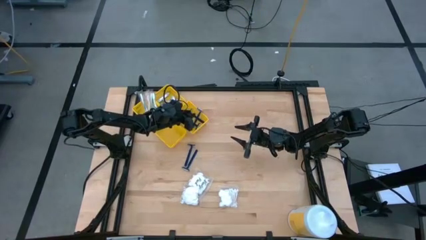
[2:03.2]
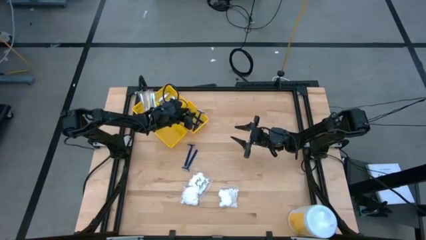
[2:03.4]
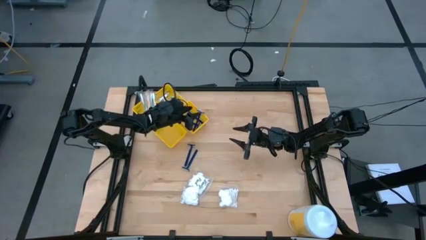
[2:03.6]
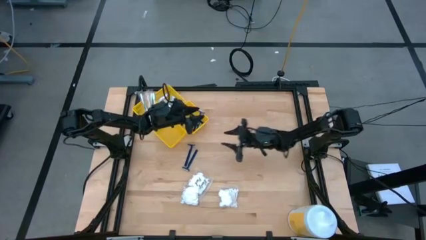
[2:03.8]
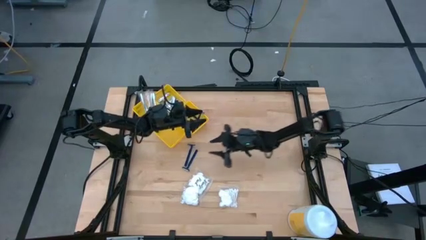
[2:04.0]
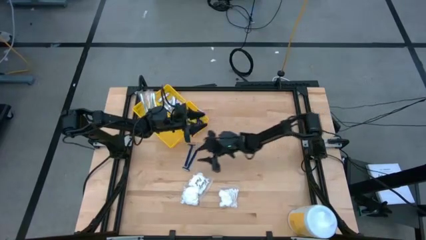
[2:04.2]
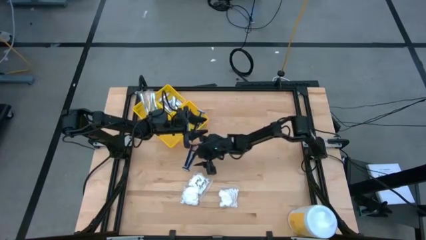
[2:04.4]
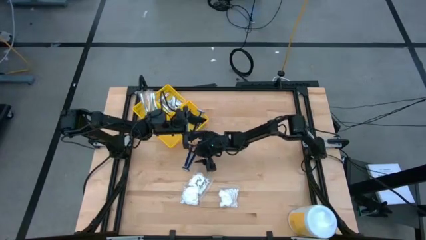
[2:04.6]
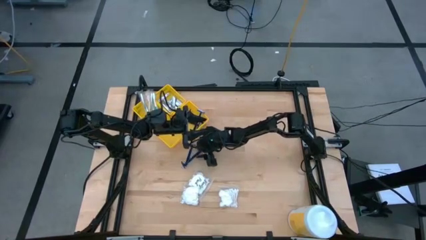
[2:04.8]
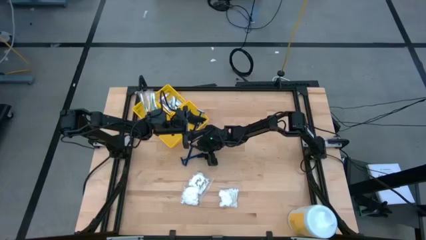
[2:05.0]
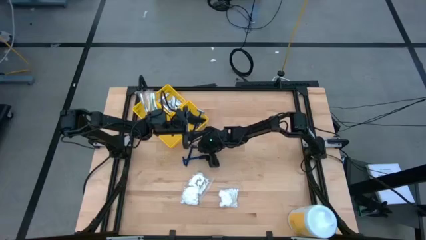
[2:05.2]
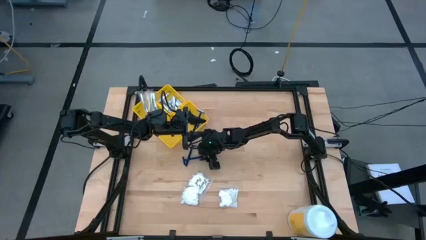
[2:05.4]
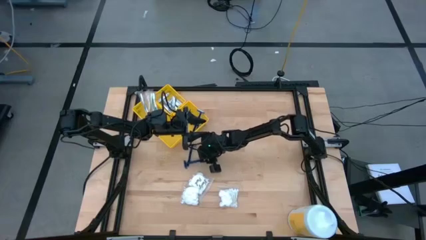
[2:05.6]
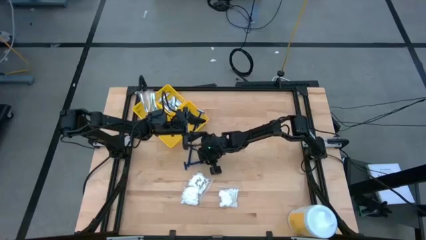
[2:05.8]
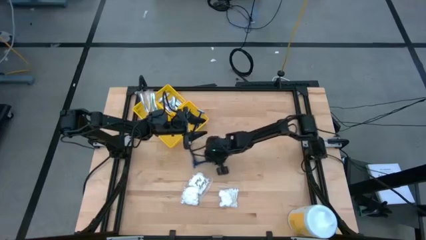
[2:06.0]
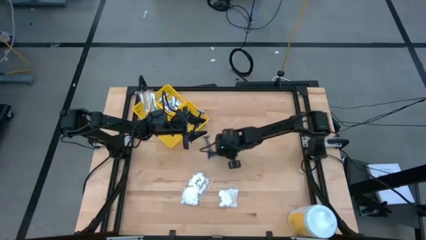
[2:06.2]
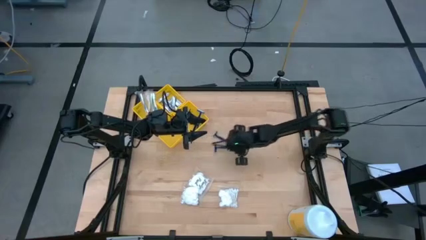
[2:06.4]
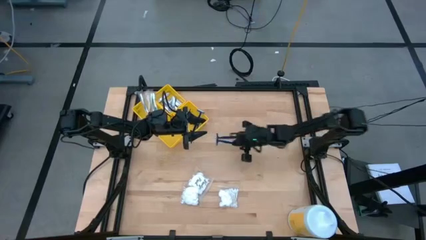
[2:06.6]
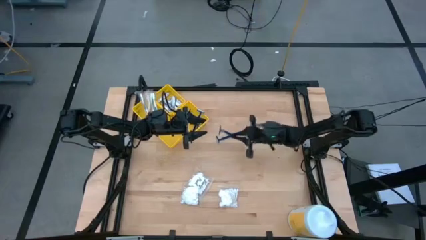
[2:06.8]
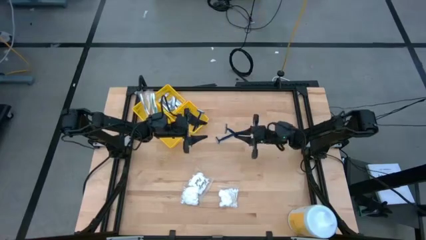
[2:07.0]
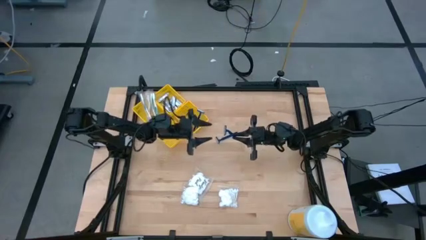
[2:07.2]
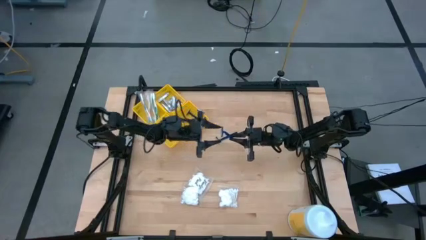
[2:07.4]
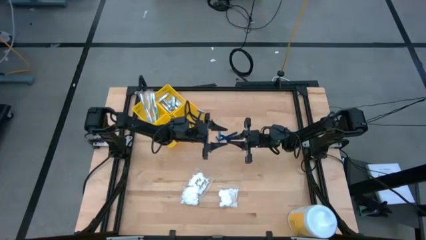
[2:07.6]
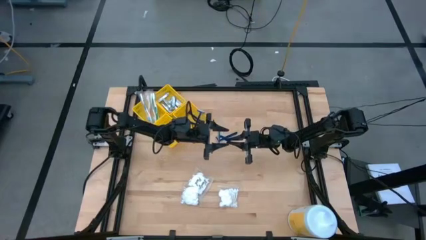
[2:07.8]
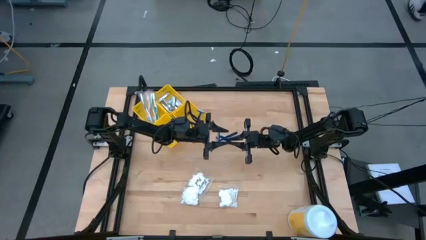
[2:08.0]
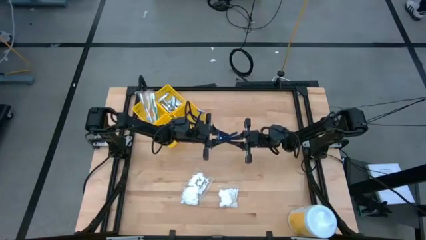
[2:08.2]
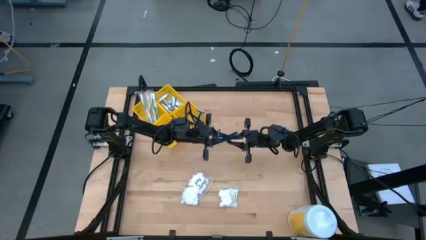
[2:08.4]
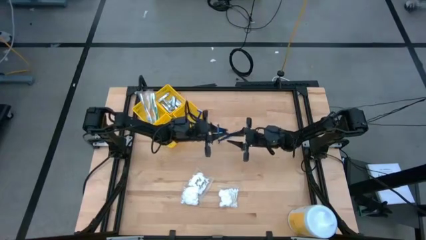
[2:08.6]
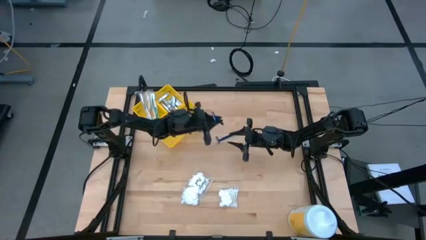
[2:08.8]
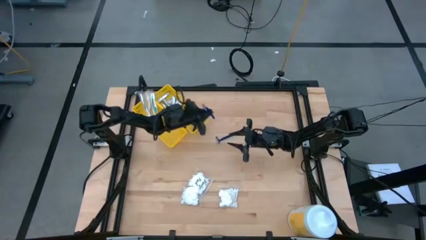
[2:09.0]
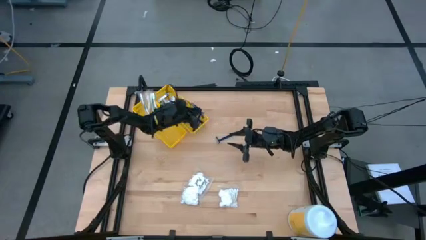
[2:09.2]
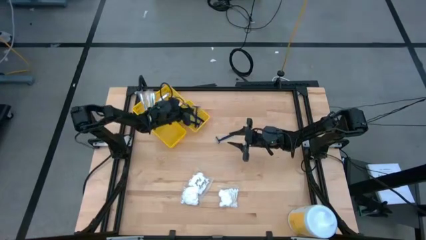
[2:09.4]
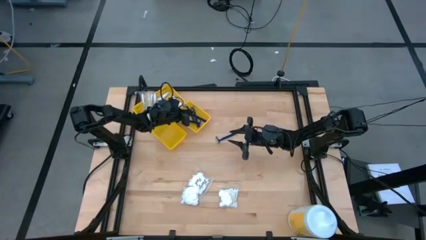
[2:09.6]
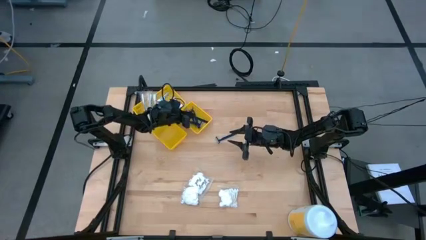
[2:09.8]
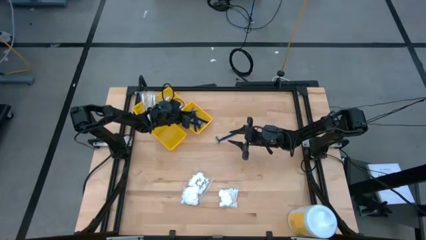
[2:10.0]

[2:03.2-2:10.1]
Task: Pick & Place Travel size toiletries
Put the blue razor into the middle right yellow bin

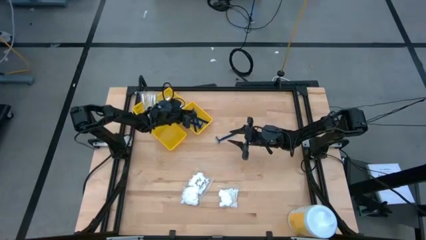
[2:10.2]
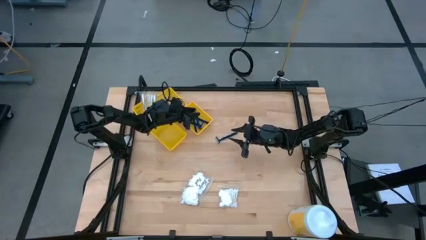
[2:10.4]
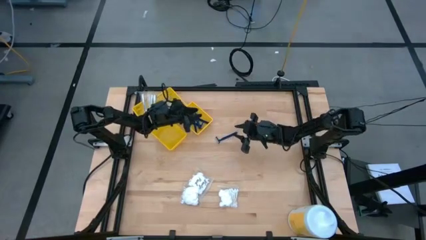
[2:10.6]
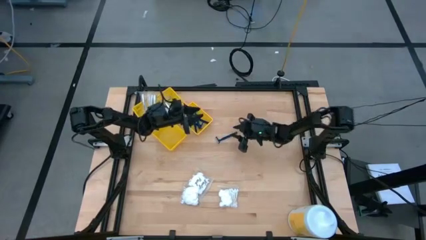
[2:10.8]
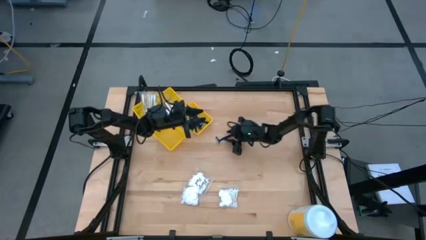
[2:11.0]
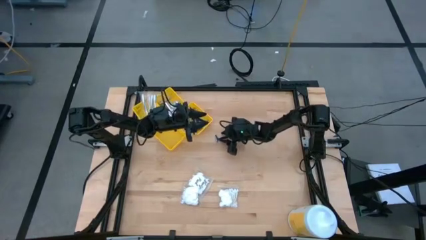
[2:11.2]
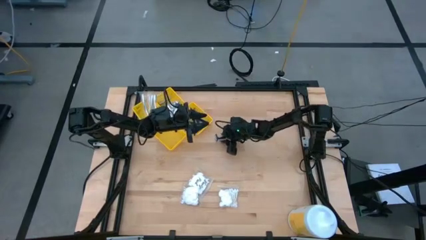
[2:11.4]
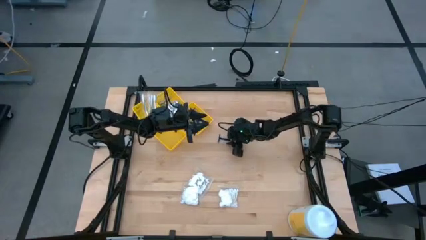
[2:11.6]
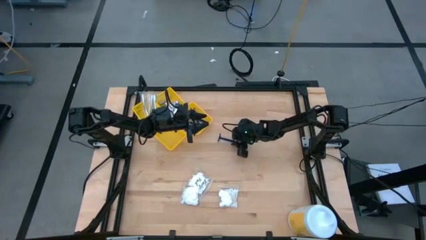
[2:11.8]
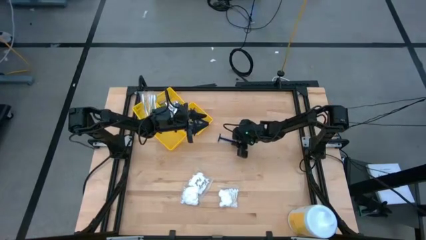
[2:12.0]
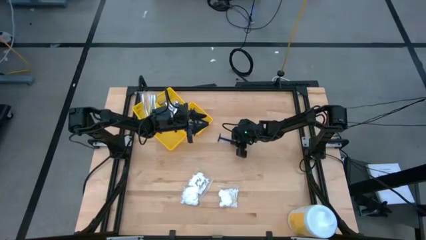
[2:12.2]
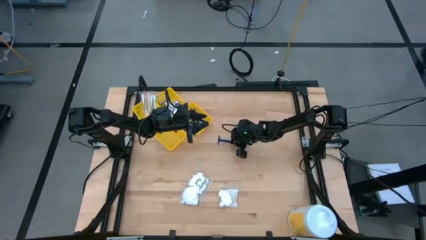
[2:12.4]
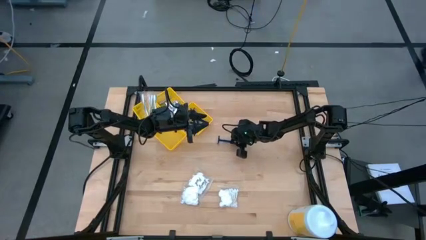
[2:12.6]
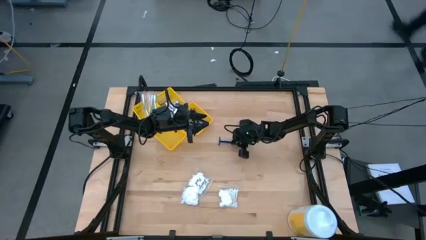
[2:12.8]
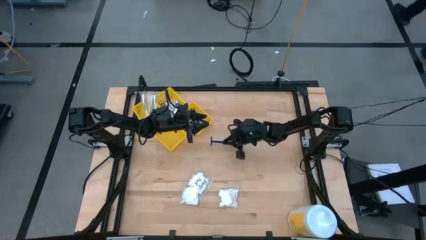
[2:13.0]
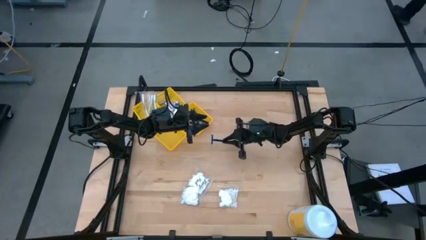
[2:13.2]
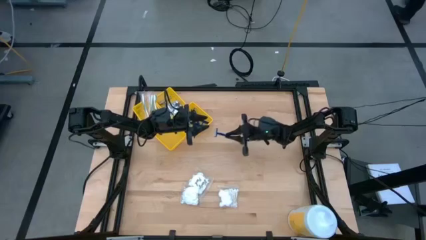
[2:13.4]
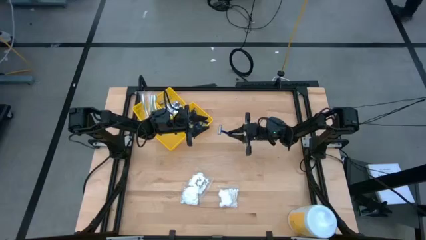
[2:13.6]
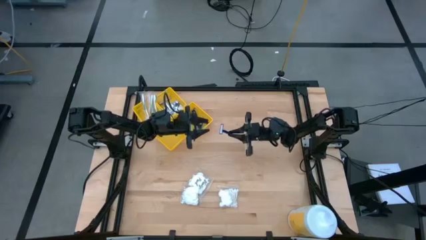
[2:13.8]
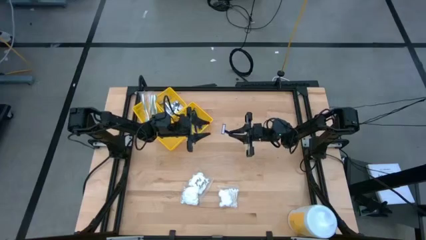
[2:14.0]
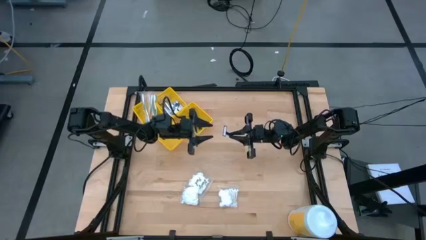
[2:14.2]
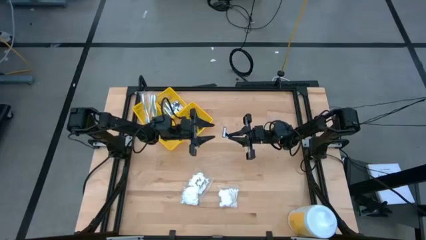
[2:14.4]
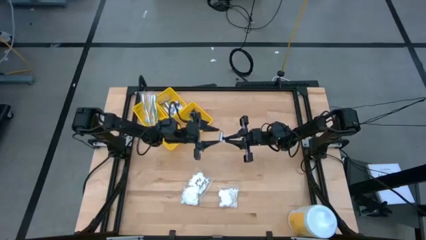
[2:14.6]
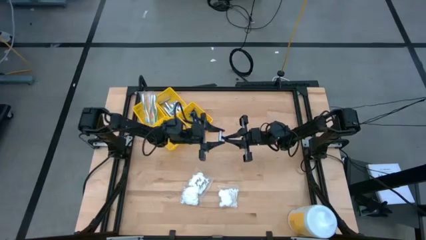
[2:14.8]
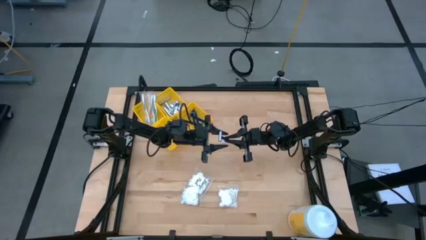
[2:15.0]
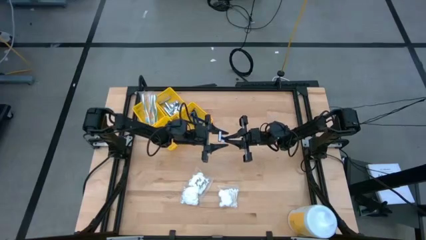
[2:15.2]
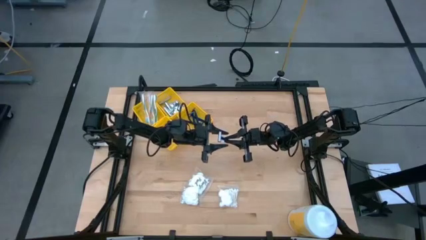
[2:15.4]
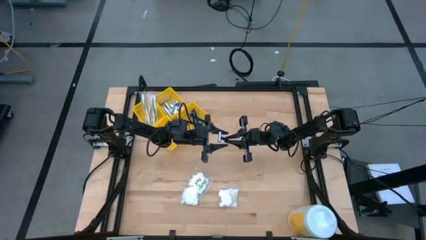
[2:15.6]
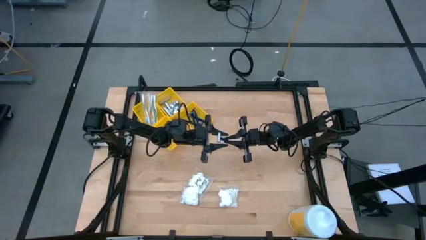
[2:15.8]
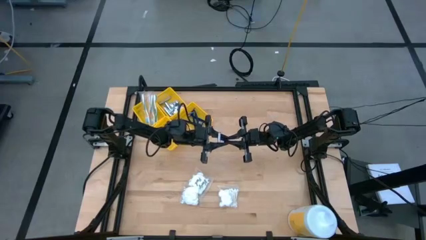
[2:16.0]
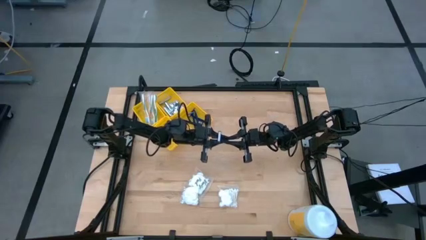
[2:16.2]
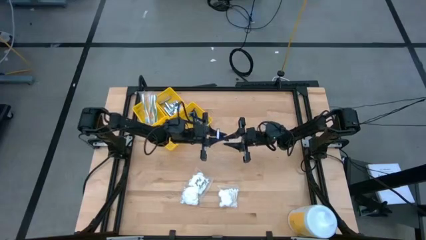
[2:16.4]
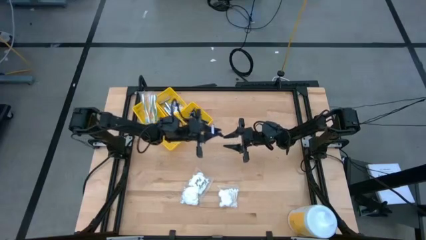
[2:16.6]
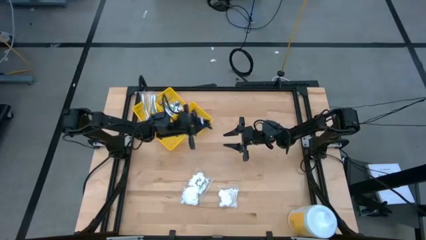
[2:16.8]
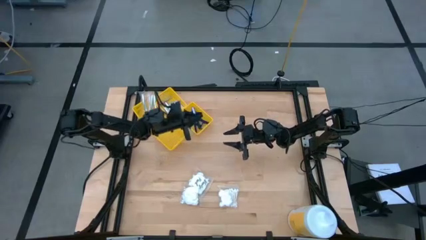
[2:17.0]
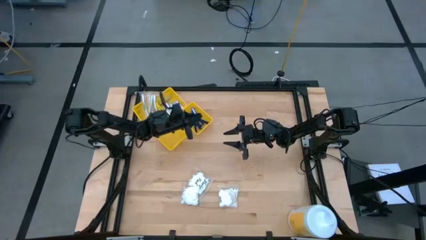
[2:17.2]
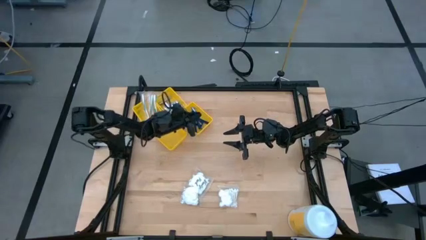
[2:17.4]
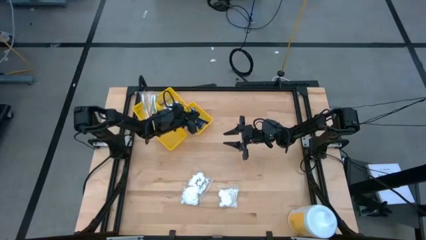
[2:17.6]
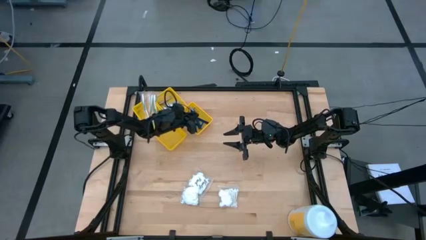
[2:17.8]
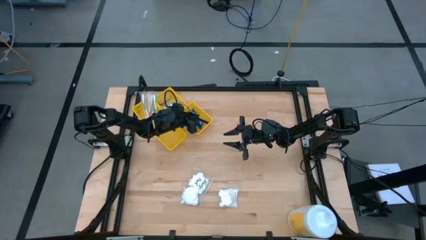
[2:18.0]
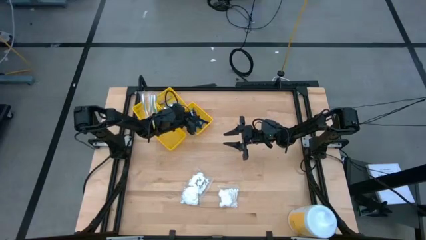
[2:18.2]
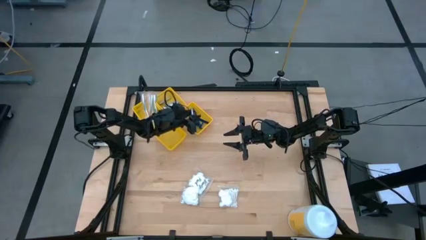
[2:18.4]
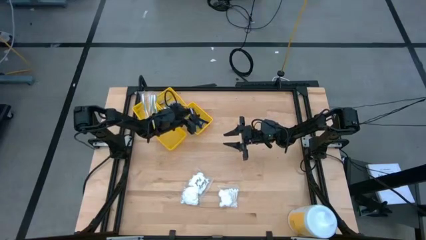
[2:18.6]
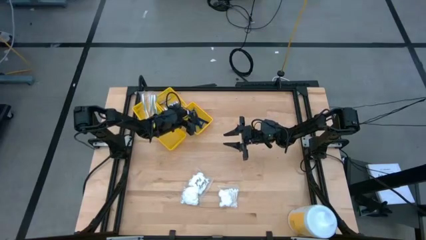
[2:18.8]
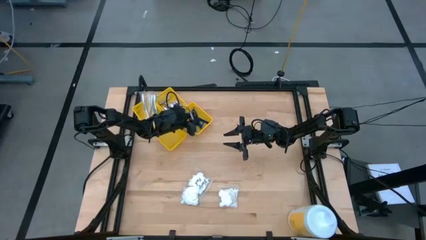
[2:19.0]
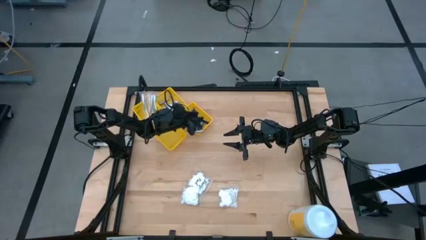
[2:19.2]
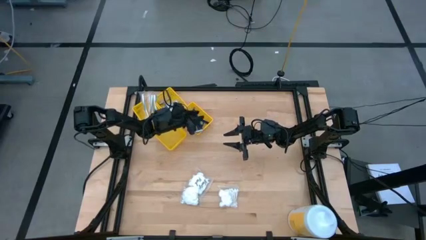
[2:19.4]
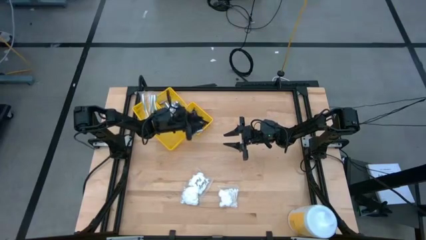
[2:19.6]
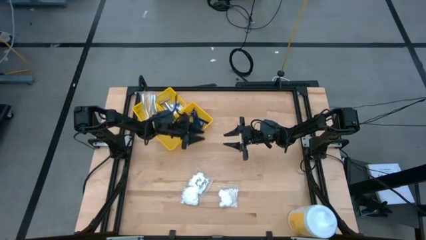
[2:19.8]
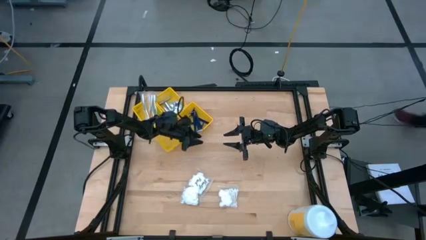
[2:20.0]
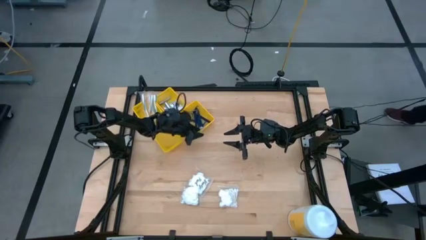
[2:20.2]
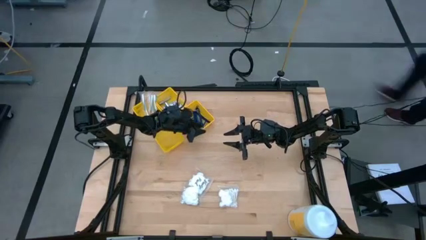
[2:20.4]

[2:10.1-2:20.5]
Put the blue razor into the middle right yellow bin

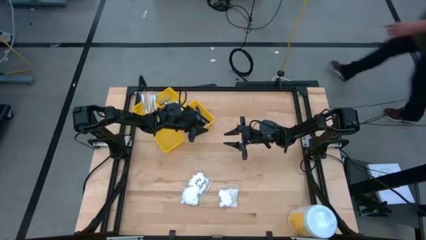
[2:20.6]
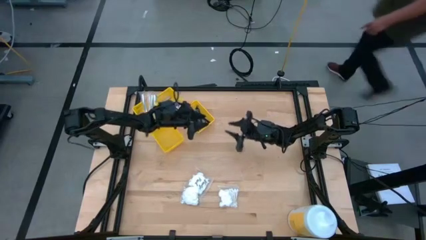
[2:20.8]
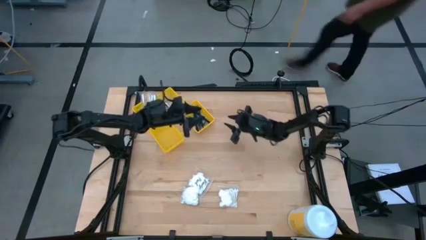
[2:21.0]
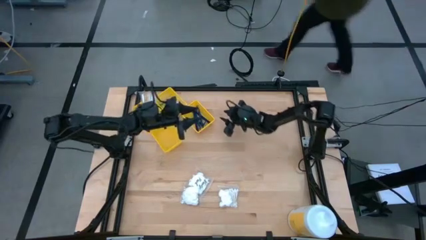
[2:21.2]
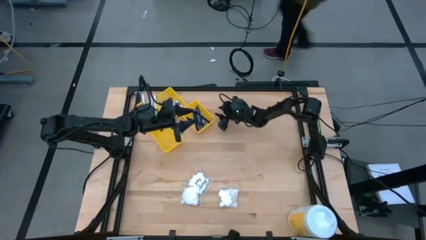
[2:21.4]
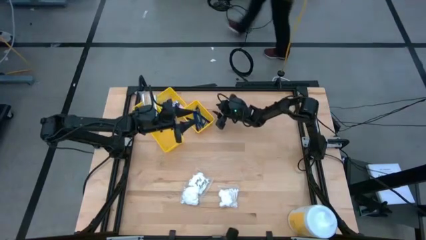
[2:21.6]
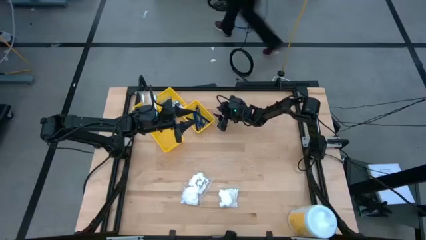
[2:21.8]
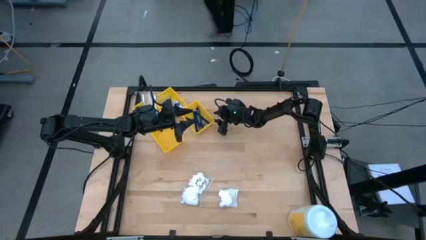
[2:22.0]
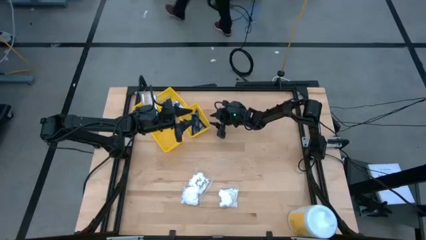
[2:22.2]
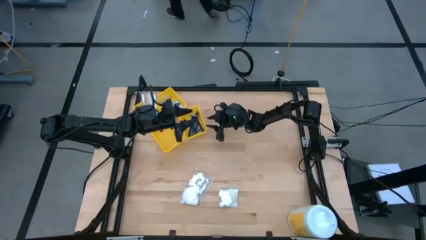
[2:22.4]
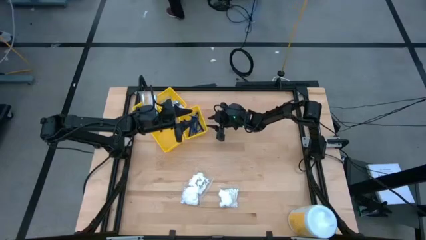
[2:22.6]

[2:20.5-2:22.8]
Adjust the middle right yellow bin
